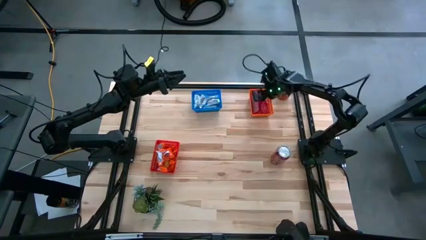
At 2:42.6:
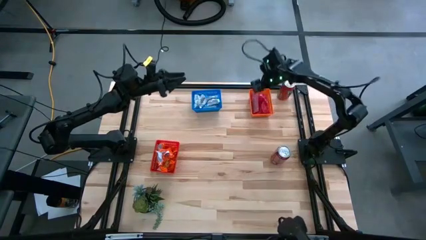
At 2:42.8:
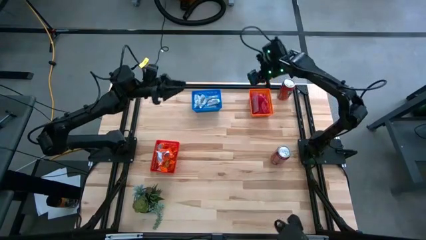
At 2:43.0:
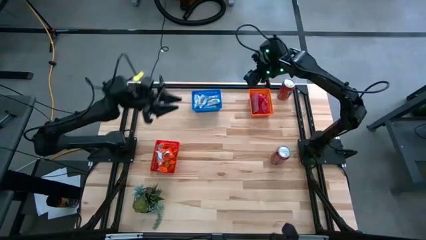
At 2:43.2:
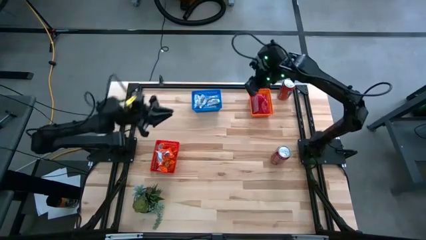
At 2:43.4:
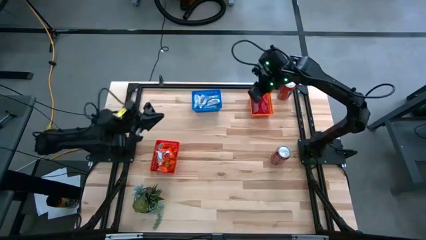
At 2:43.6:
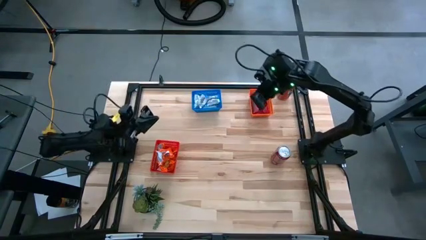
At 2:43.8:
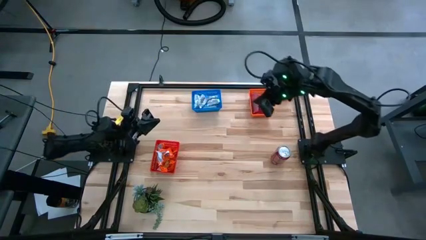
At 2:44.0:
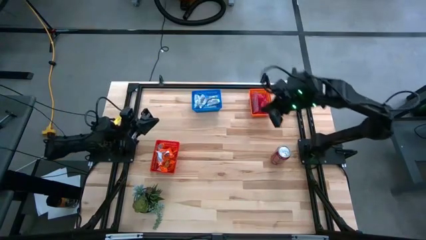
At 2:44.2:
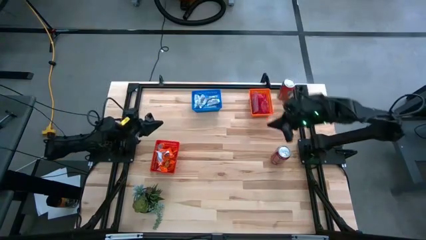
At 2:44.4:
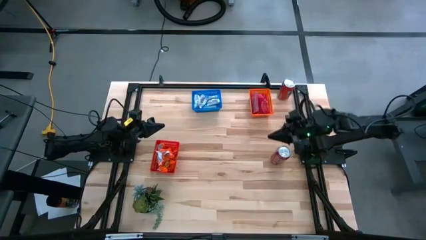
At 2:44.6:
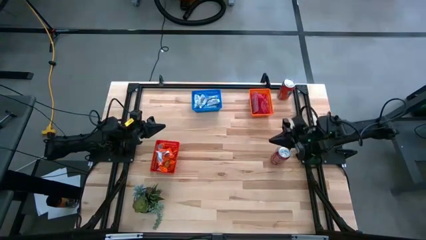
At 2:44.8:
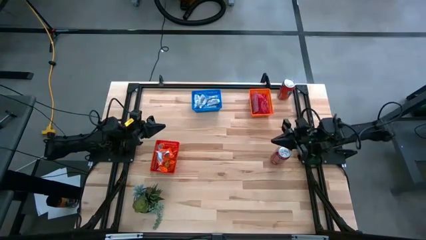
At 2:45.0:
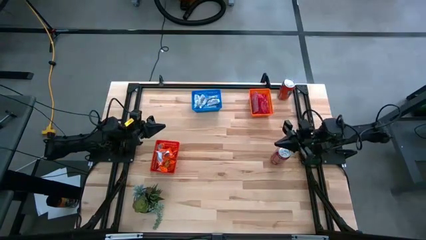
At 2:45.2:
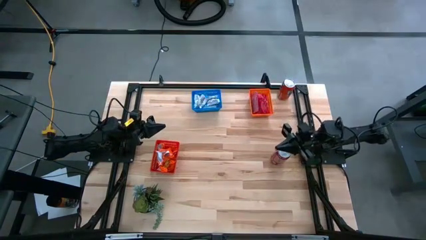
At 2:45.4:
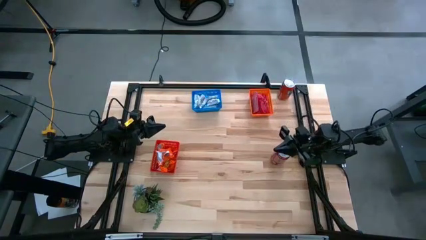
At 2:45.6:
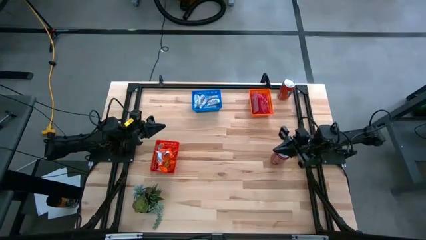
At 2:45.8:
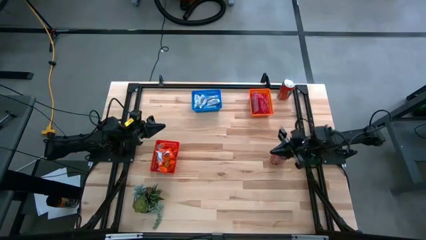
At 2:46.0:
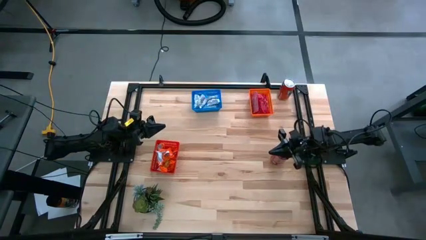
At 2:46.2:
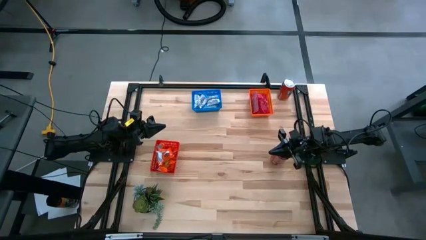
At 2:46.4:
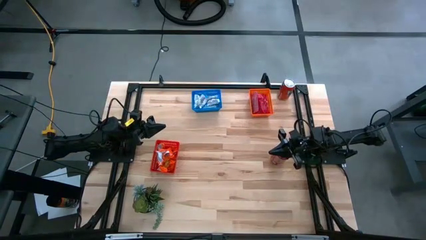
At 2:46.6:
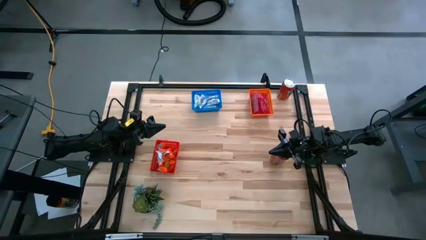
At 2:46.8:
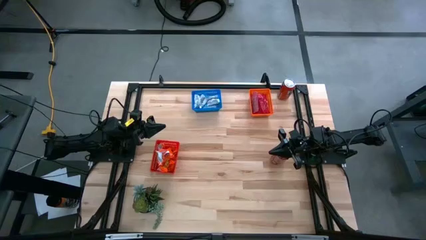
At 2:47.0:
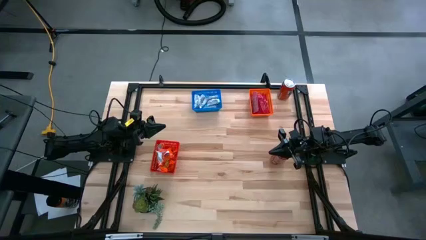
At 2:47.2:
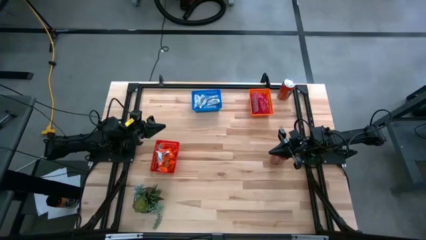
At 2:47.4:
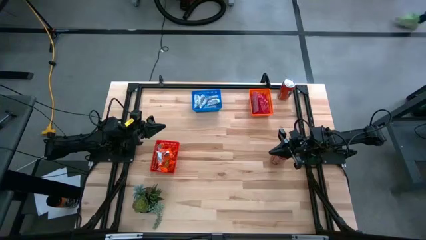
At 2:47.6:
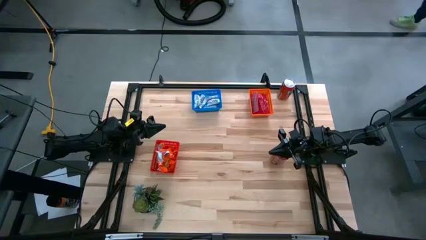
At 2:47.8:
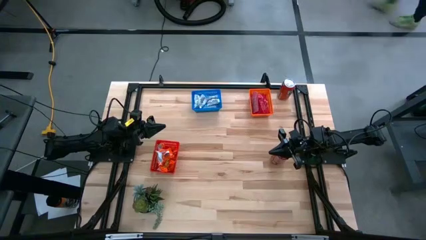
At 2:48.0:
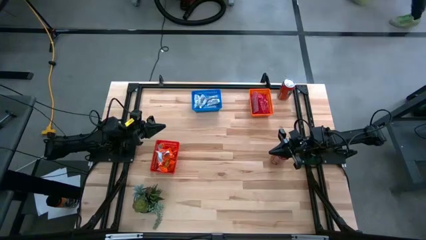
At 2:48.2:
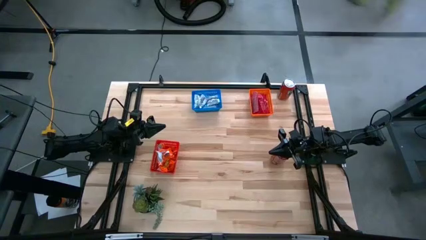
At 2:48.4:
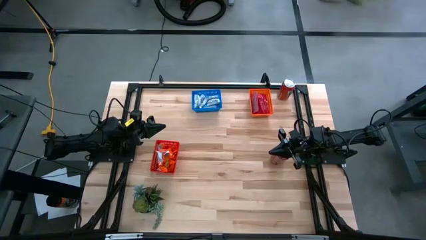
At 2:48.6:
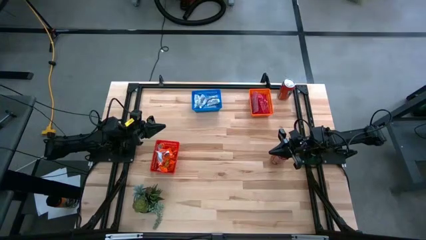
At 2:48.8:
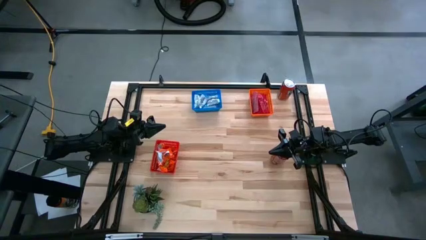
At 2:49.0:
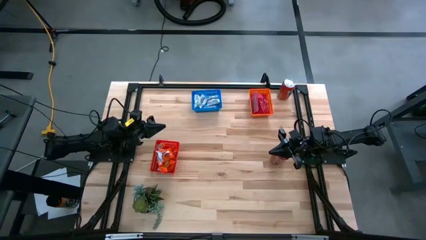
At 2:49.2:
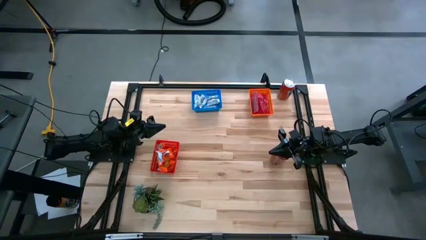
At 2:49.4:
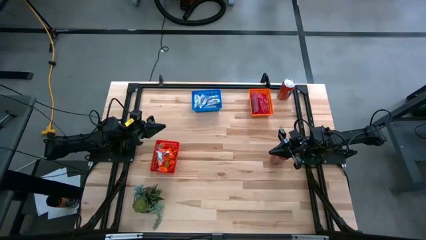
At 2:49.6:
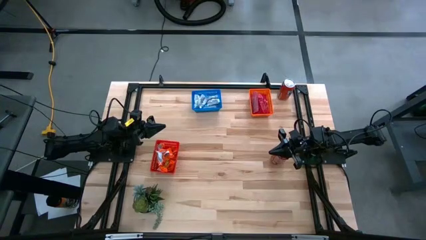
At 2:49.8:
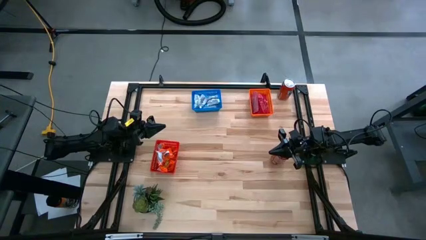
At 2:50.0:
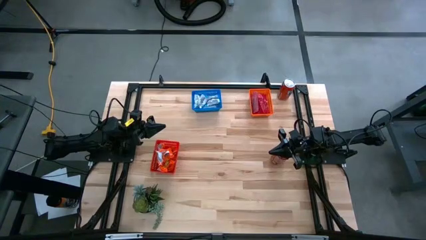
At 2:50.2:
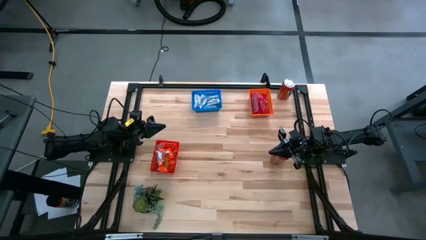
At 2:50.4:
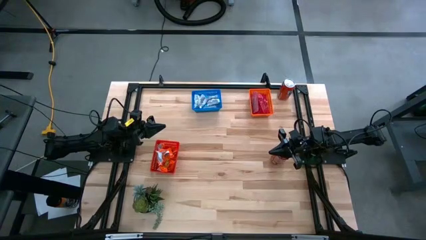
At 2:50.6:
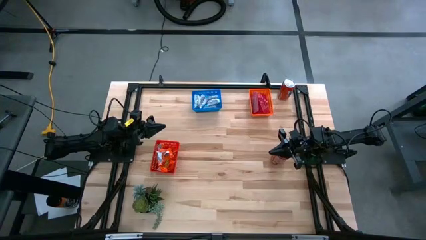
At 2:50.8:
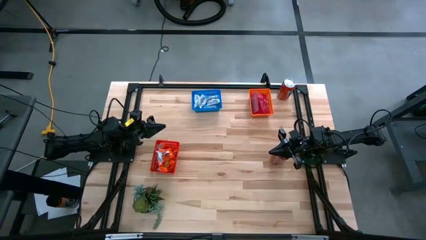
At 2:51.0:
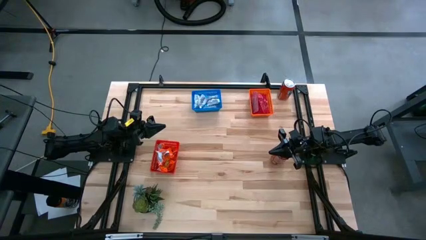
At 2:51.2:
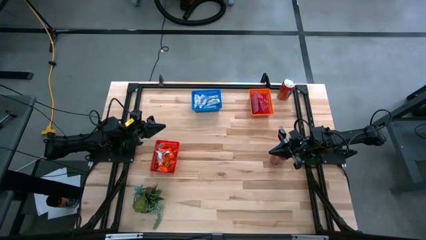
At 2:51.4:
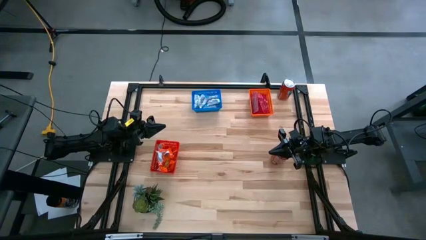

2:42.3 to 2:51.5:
Task: Sort candy
Return to Home Position

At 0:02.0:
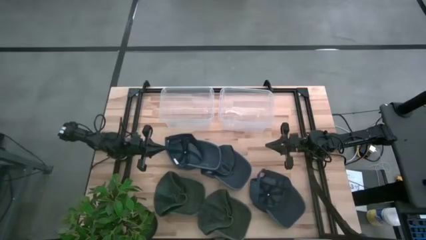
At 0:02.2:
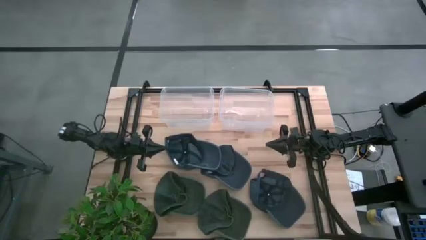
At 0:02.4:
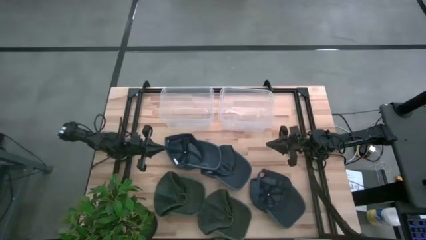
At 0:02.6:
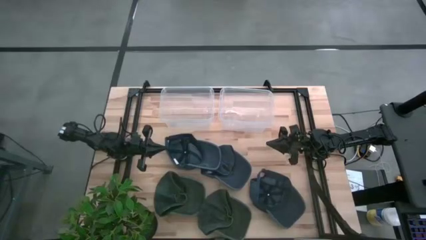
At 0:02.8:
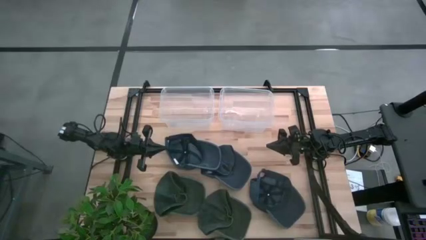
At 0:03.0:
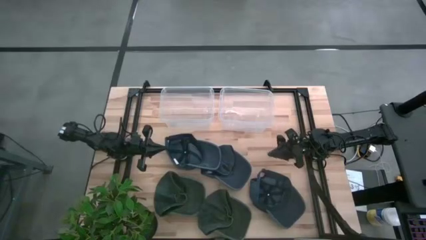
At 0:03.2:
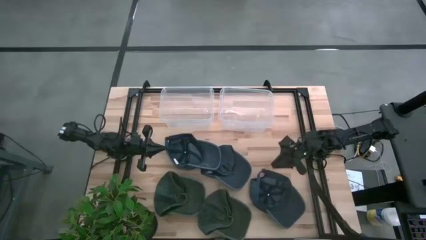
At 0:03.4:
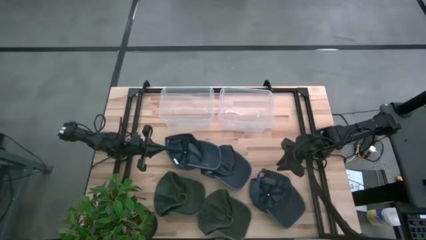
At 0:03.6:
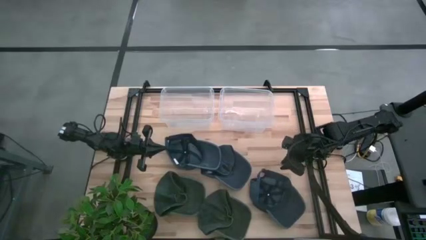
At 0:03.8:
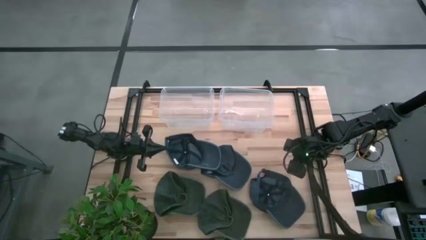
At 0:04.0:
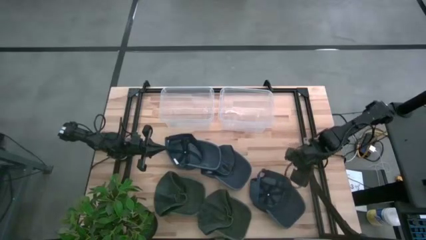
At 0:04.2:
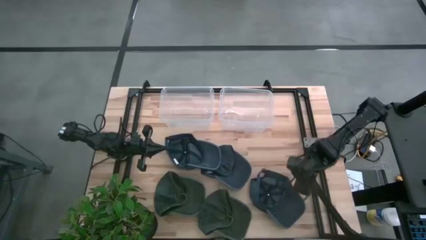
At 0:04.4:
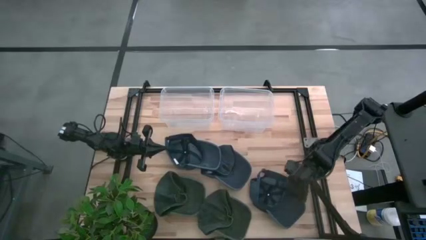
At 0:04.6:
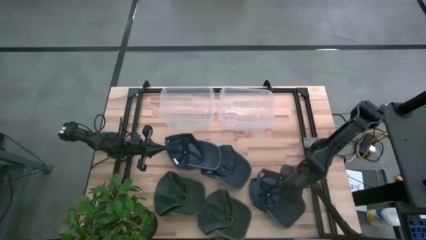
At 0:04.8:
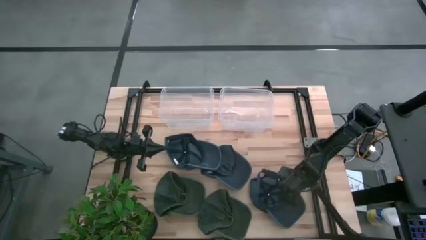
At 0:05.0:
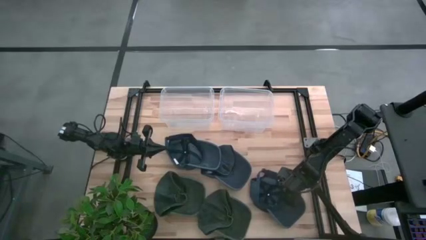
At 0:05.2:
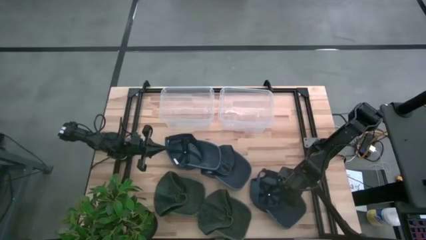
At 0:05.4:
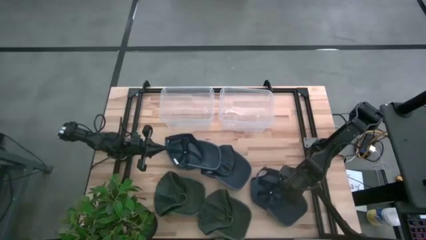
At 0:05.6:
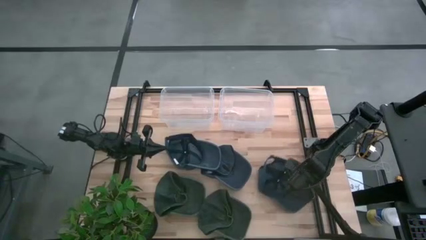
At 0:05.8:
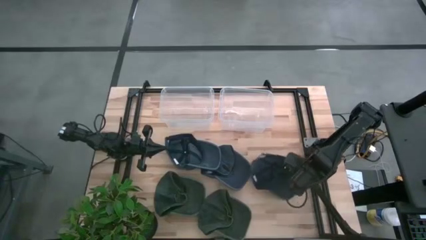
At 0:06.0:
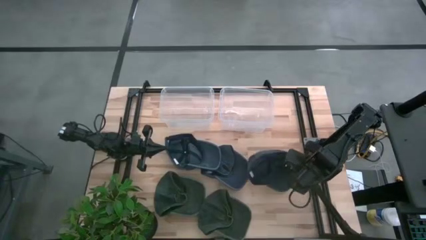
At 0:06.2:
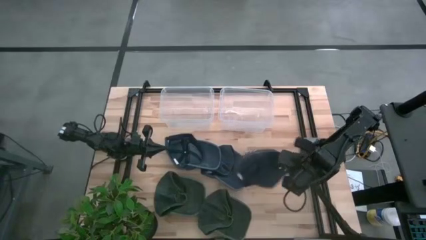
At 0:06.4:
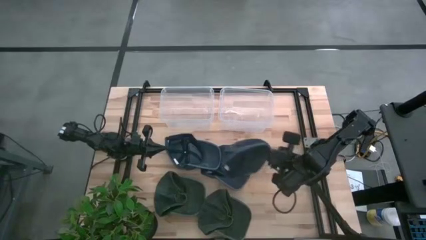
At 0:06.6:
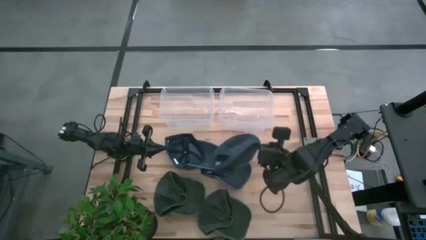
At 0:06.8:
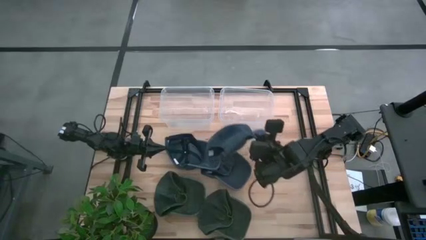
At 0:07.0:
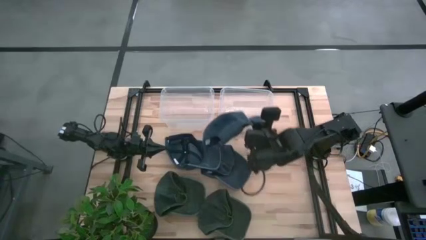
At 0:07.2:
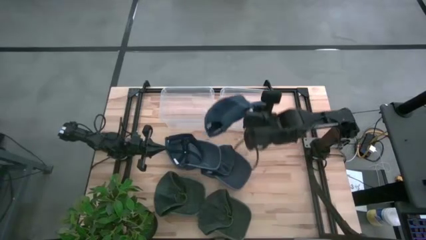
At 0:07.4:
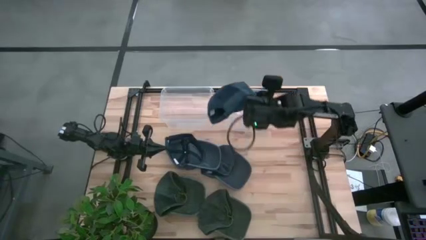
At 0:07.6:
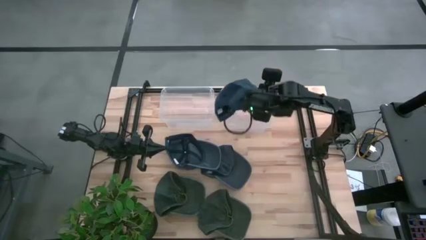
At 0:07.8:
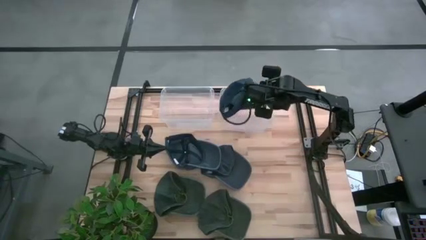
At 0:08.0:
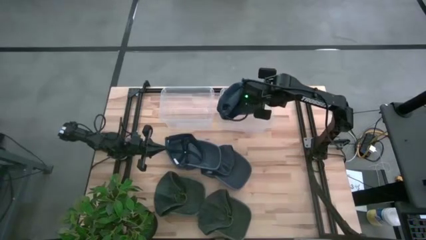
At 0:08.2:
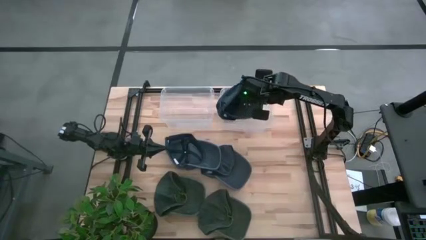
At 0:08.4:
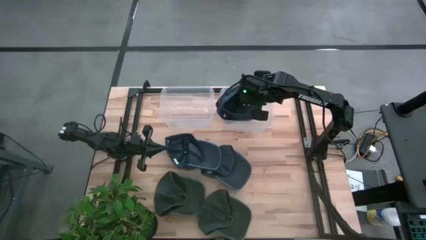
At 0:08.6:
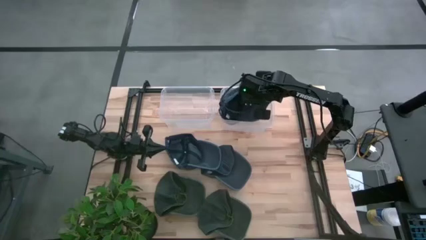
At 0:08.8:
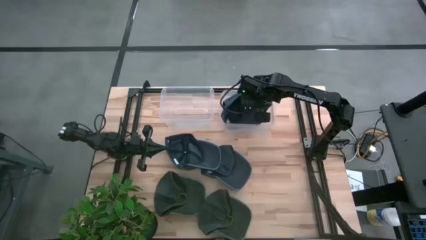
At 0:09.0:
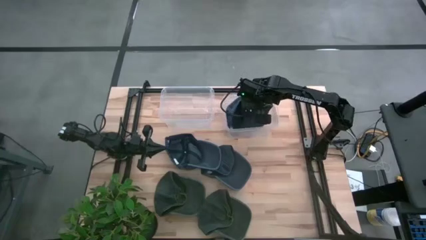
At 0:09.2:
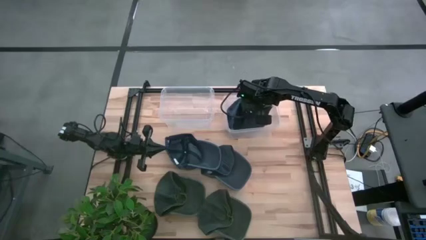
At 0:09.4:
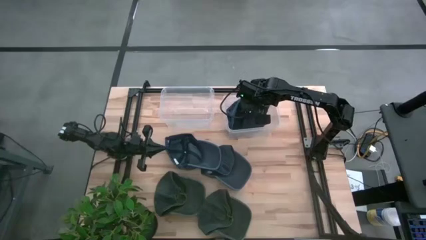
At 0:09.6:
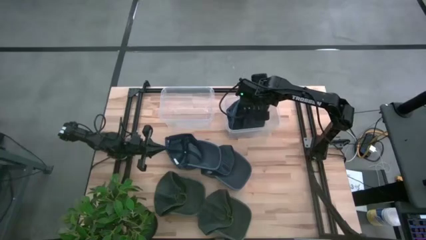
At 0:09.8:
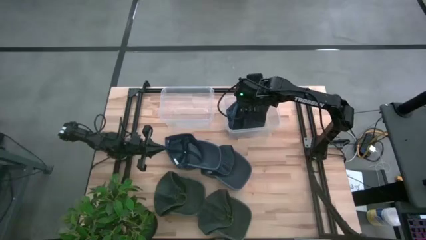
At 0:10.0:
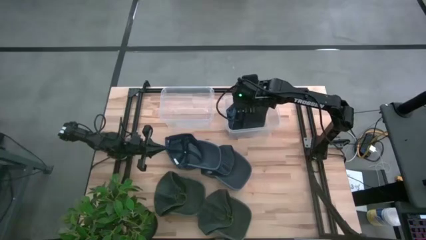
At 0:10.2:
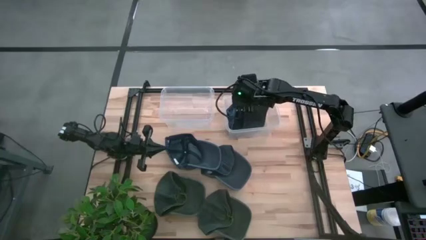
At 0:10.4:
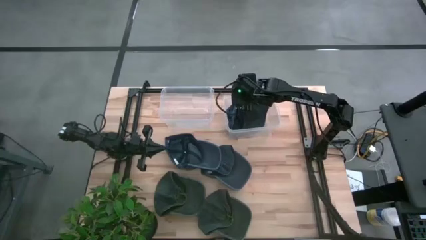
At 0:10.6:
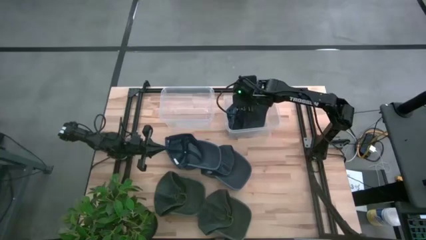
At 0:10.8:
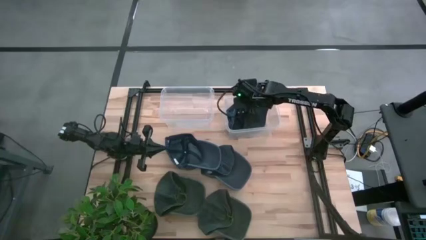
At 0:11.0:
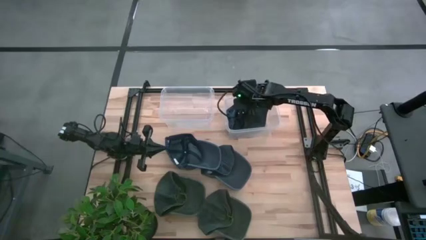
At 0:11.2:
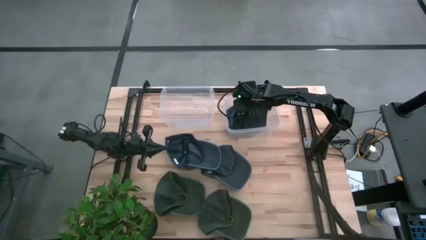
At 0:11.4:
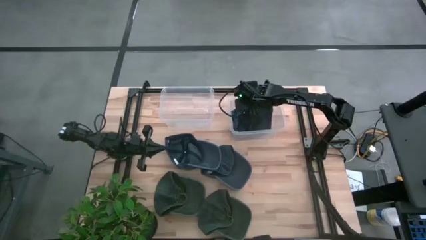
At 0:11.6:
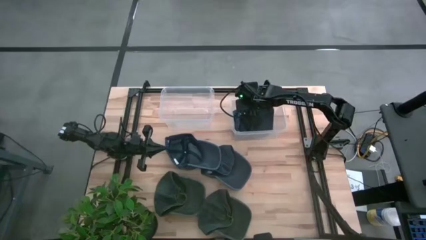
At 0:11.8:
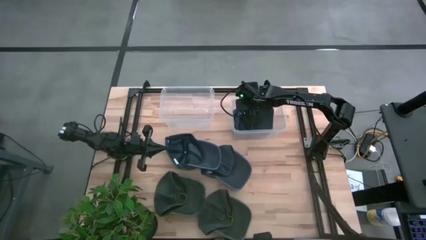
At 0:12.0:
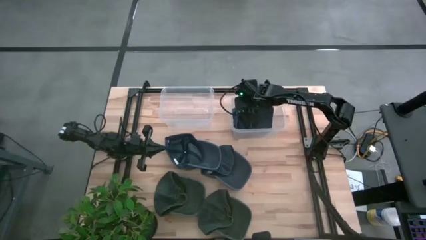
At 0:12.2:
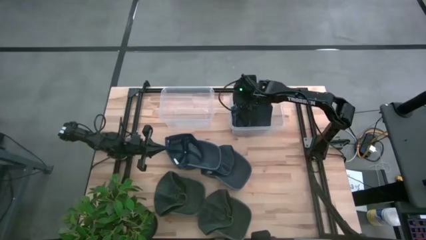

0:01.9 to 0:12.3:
Task: Pick & Place hat
Put the bottom blue cap into the right transparent bin
